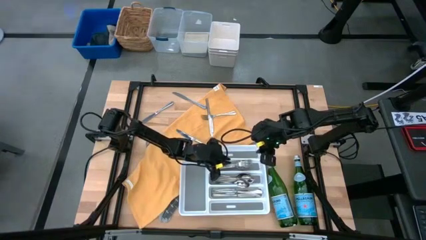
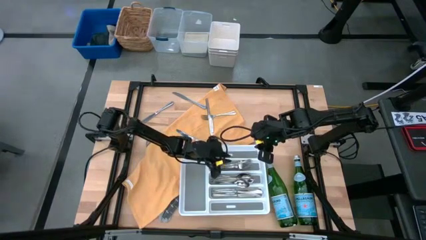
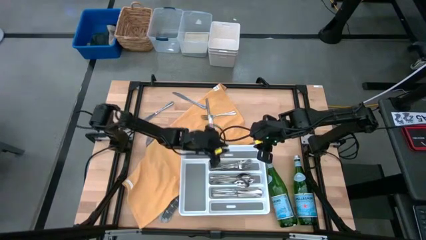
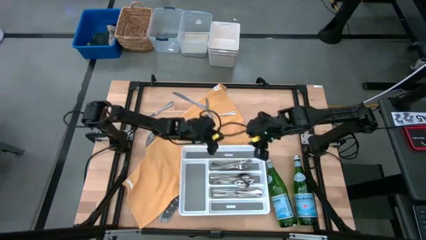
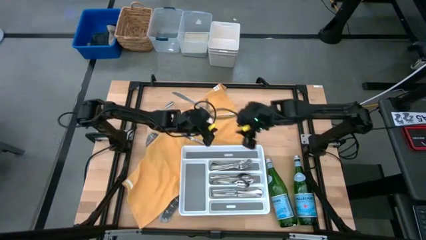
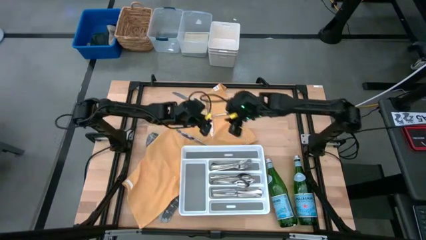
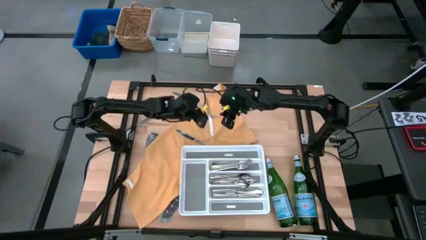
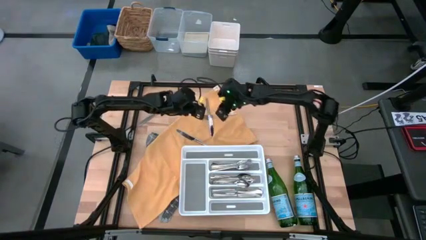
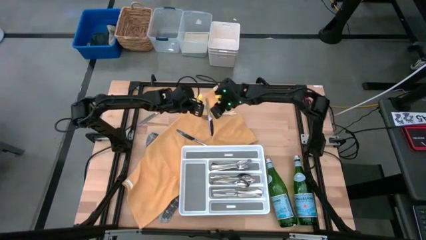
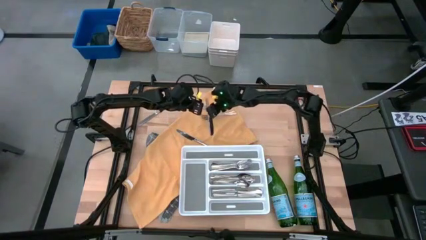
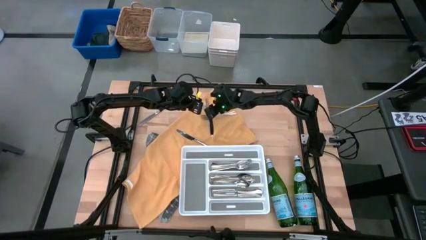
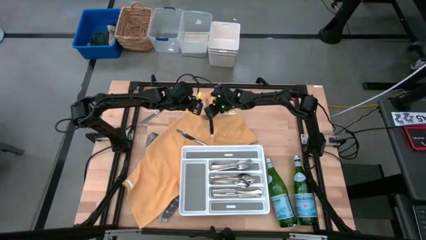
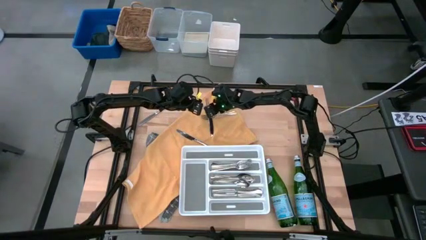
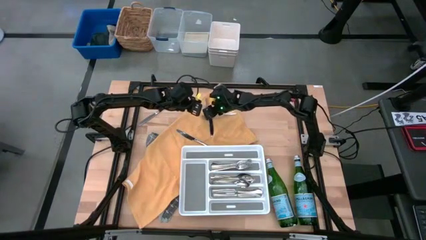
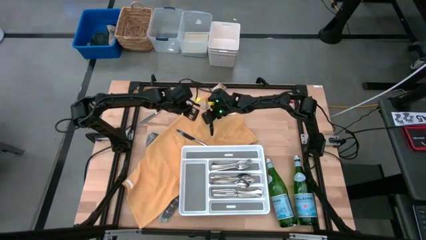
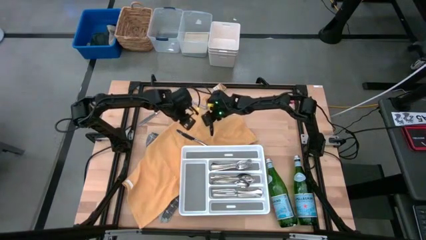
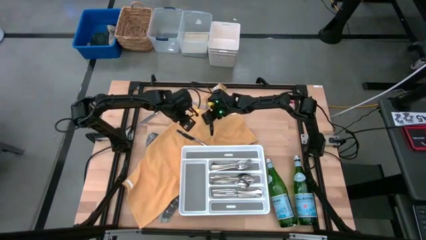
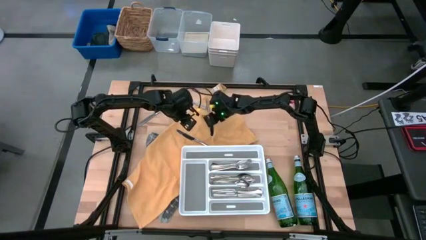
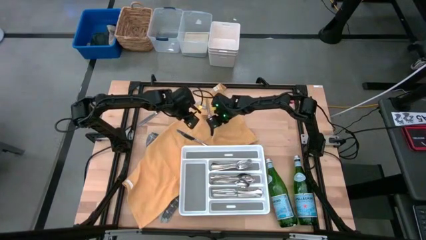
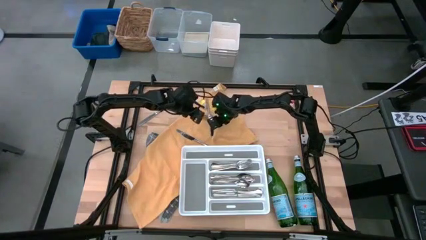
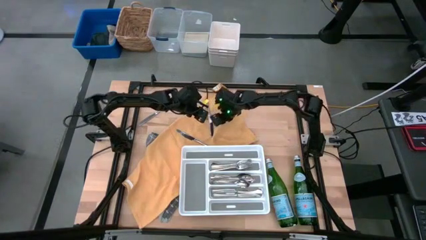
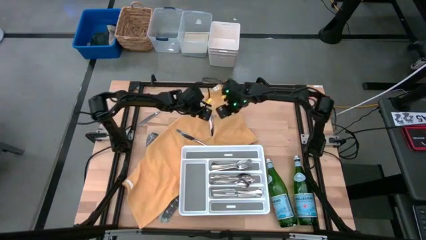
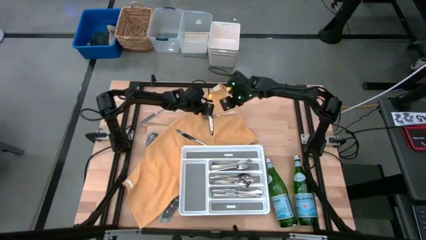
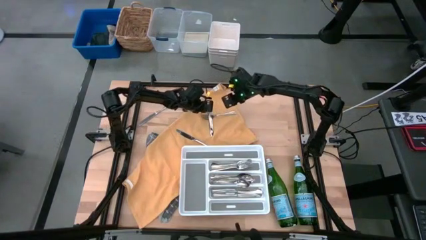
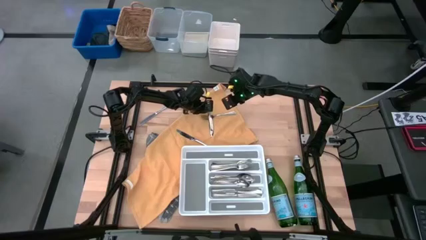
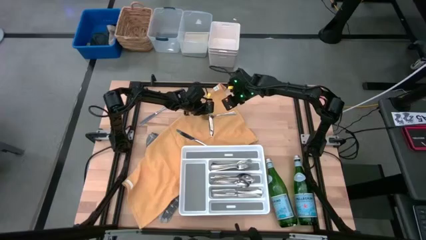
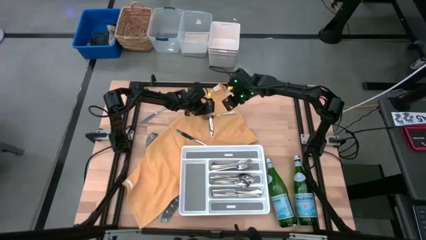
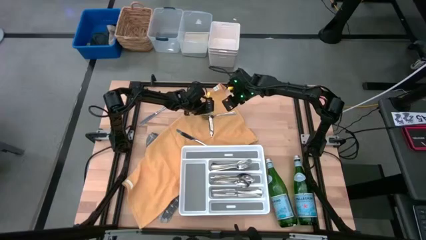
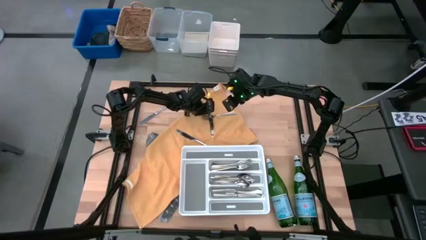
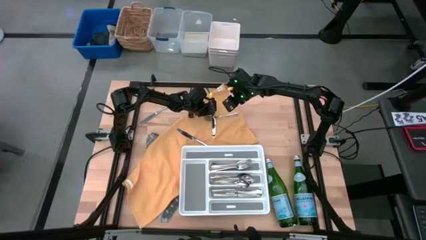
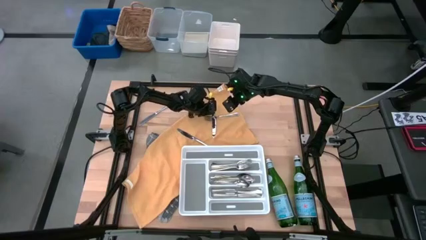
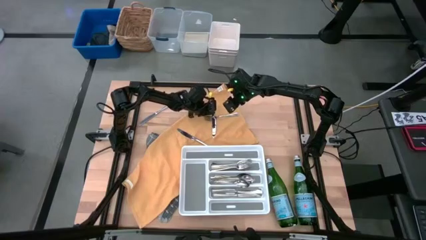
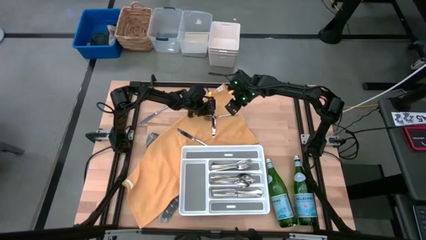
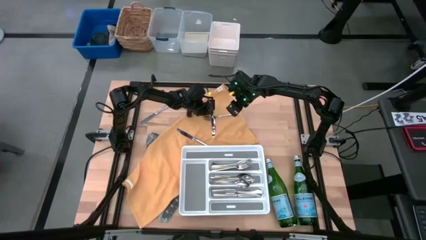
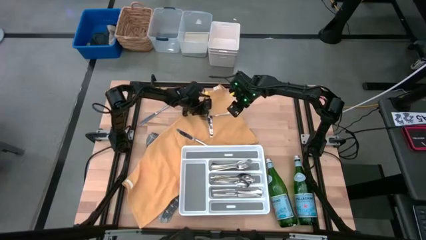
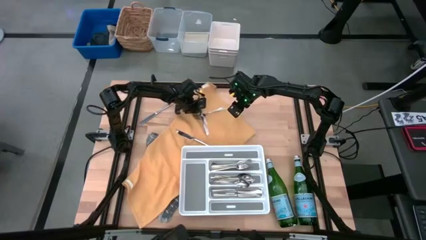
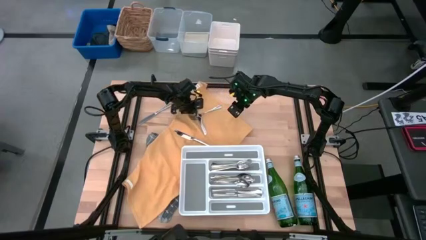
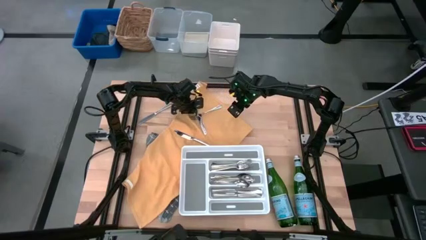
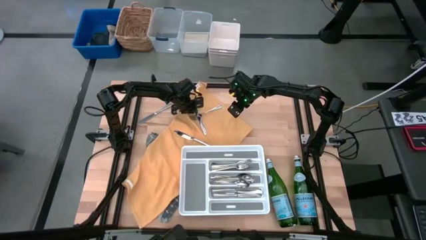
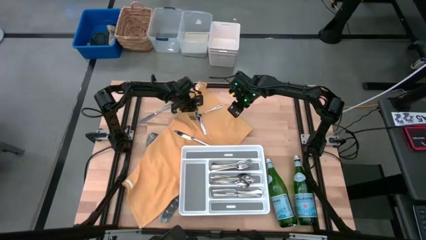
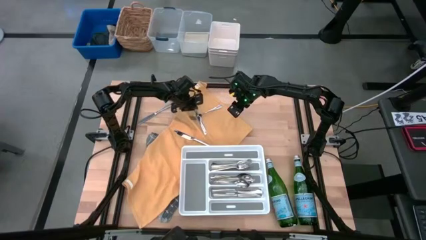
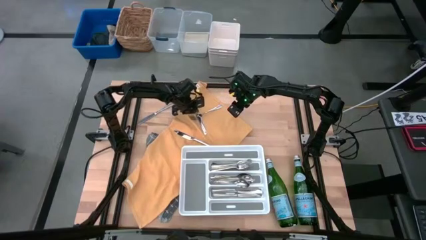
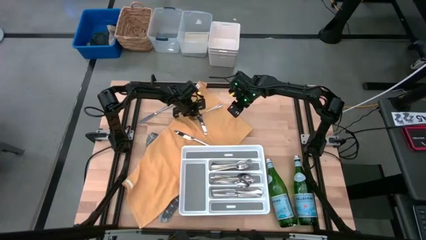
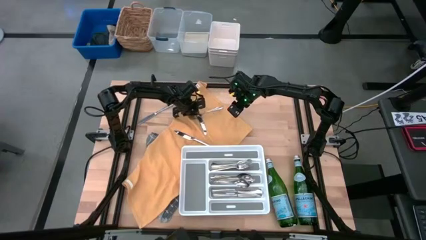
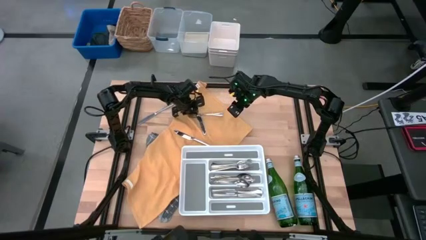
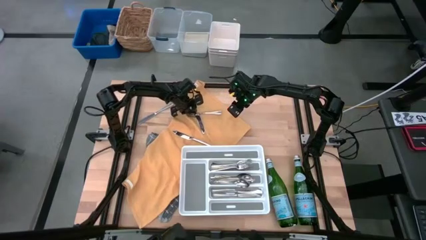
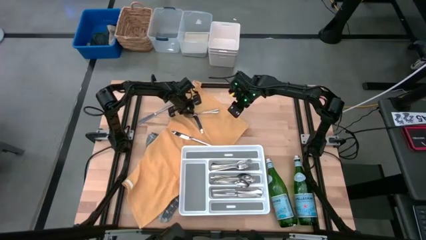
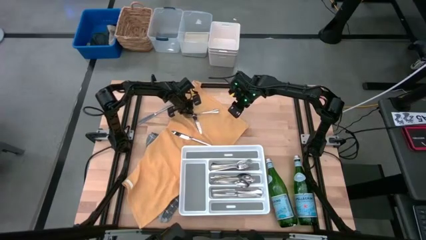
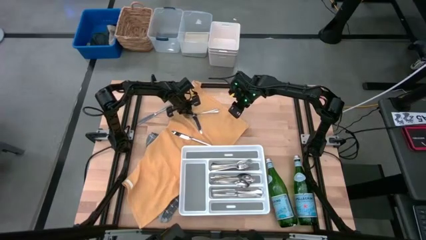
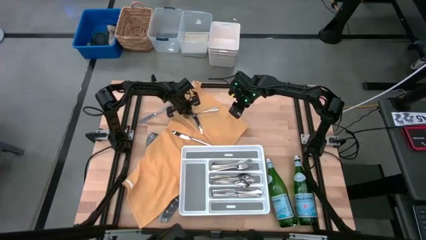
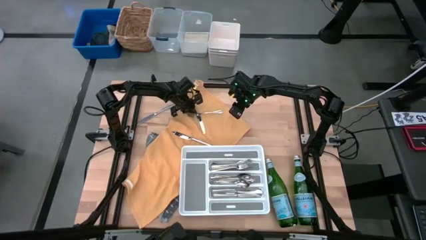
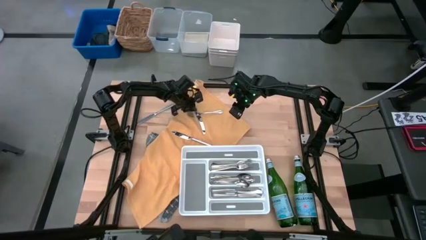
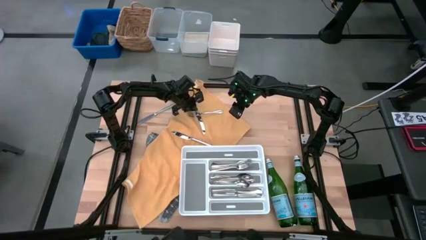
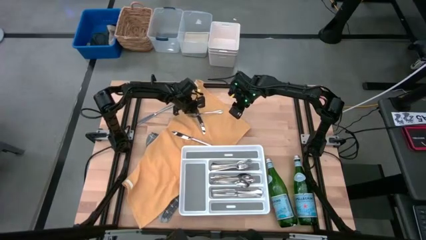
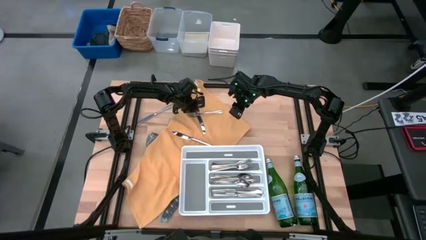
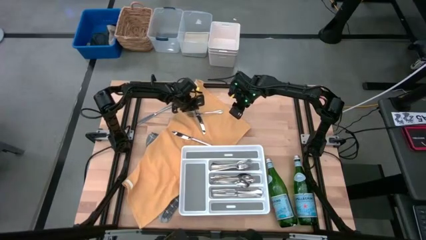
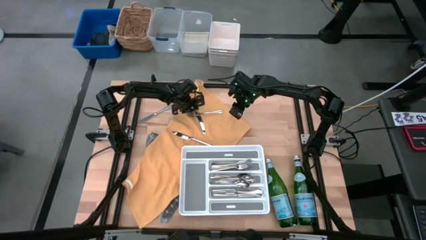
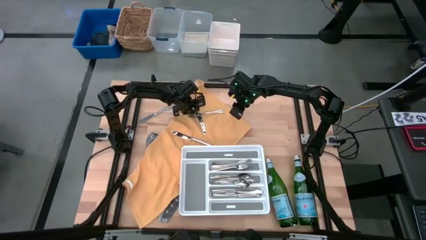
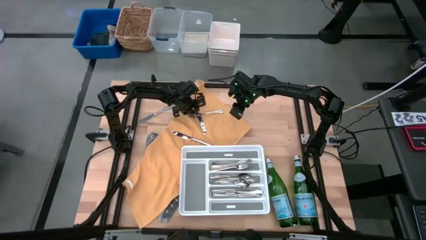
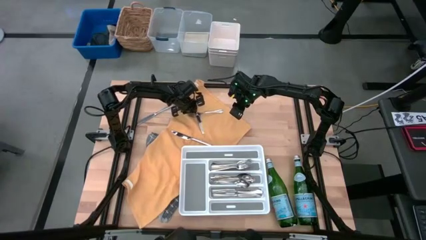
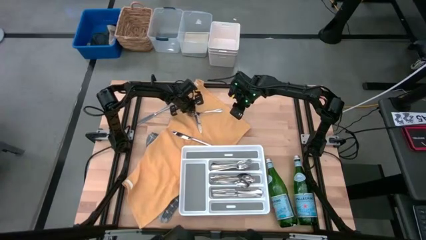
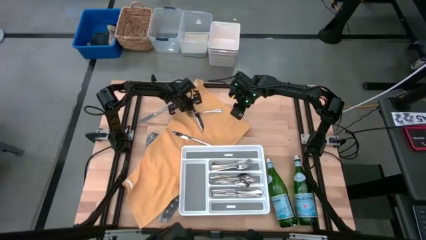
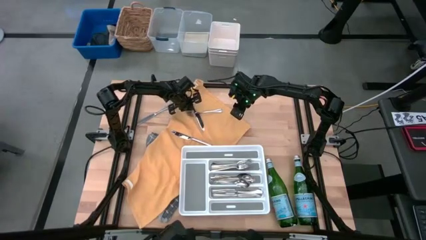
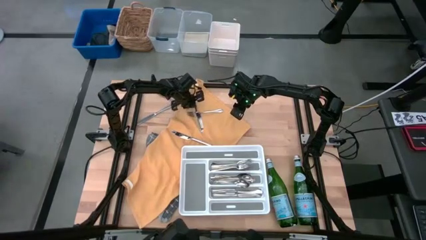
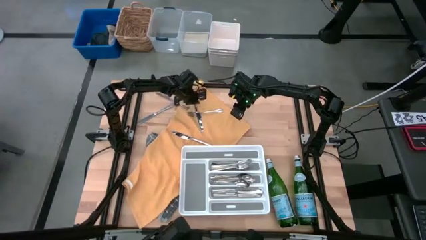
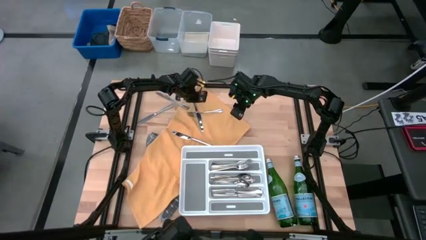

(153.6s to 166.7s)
Task: Sort silverware
Put the silver table knife into the white silverware tray

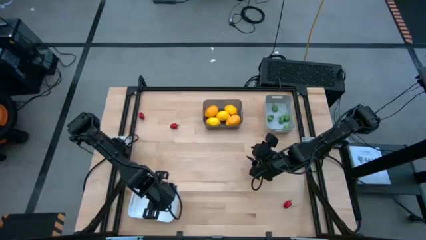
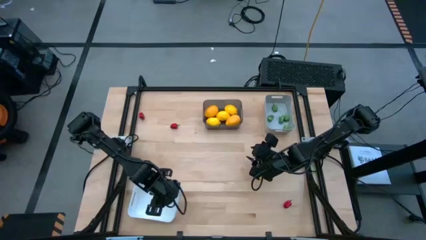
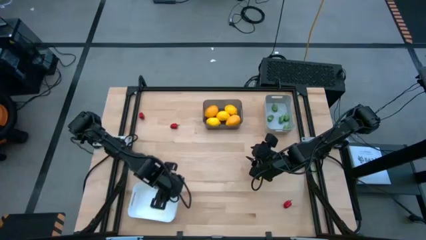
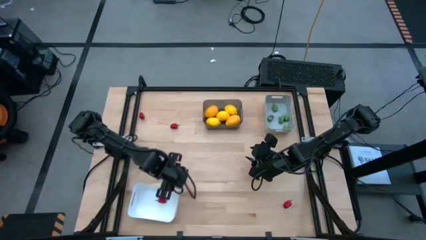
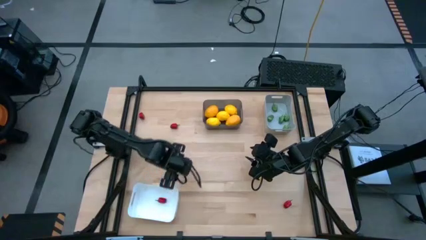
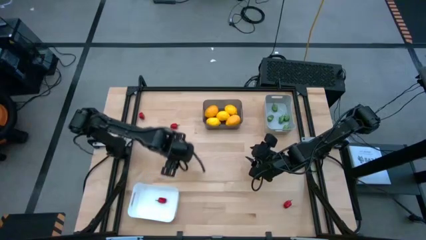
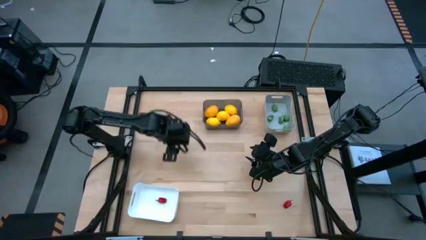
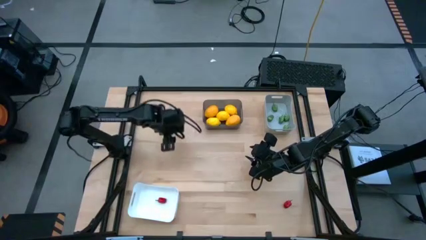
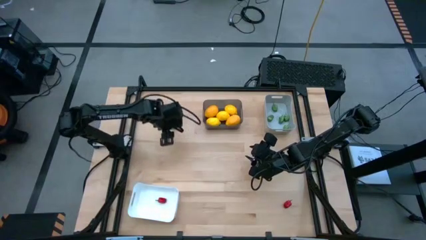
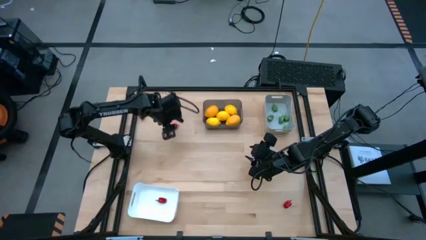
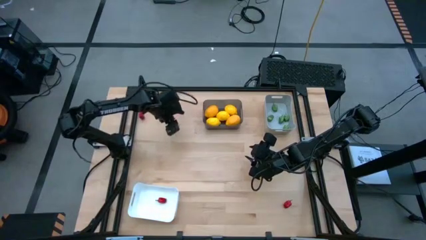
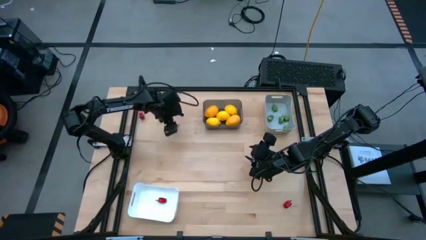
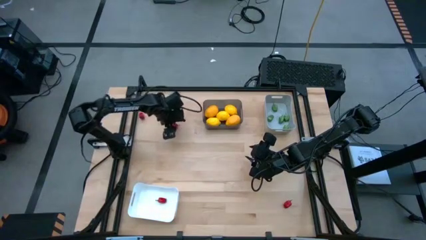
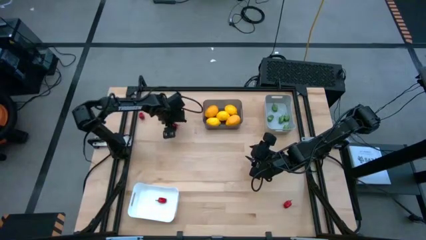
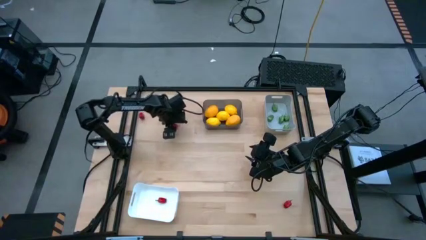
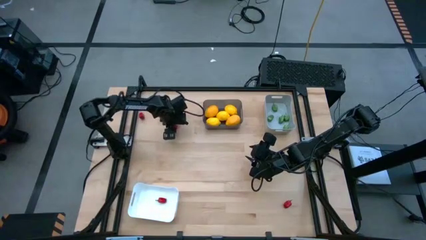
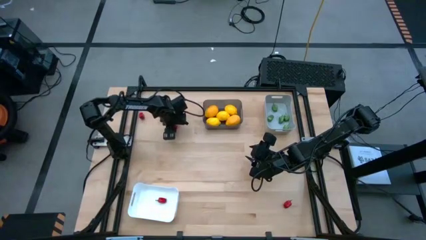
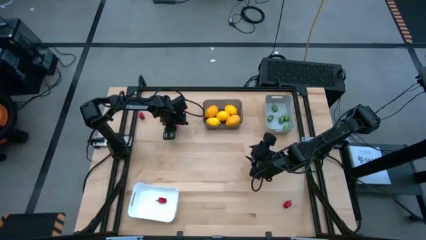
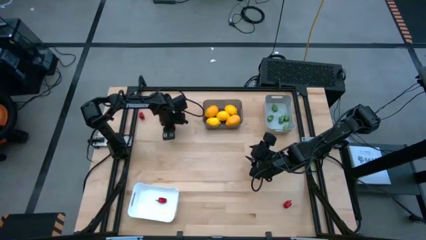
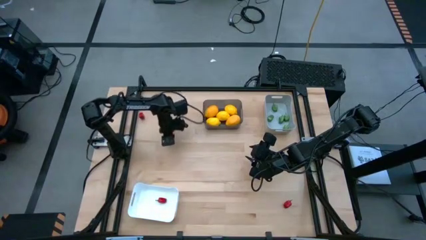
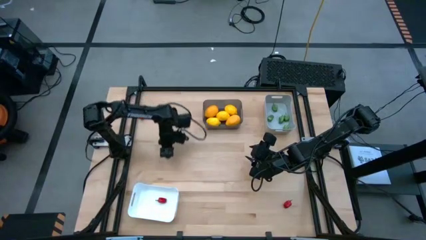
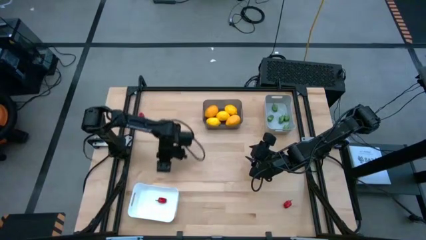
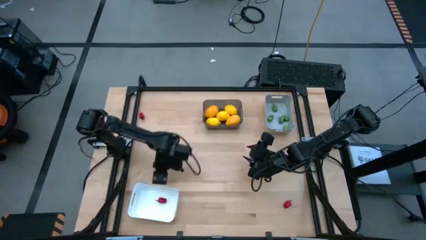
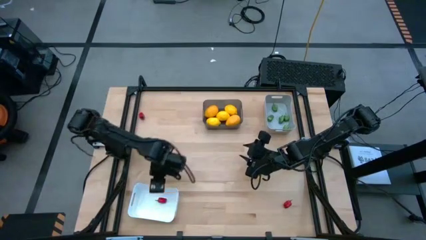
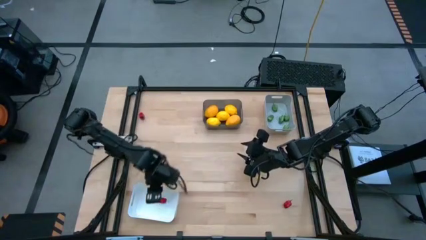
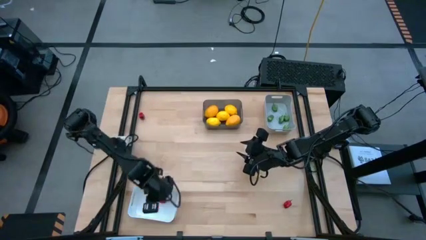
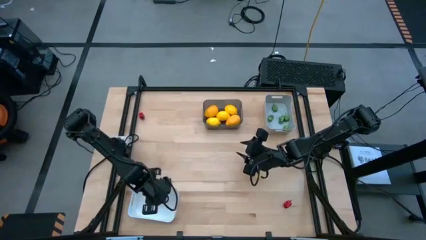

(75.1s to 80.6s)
Task: Sort produce into baskets
Put the red pepper into the white bin
